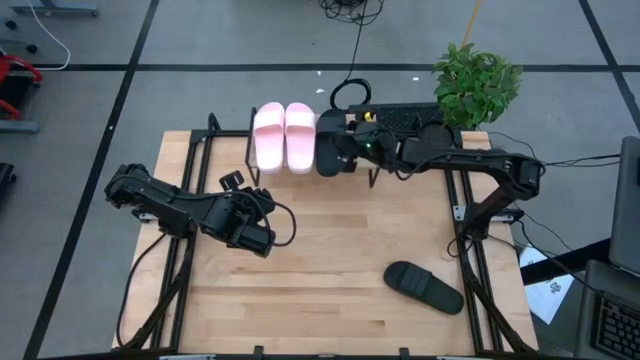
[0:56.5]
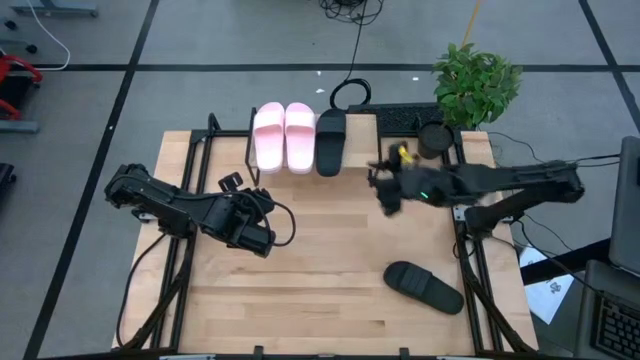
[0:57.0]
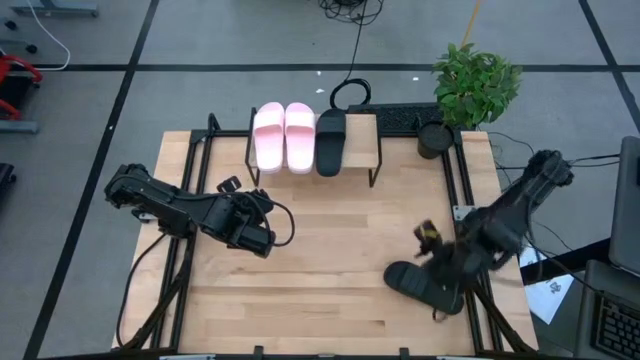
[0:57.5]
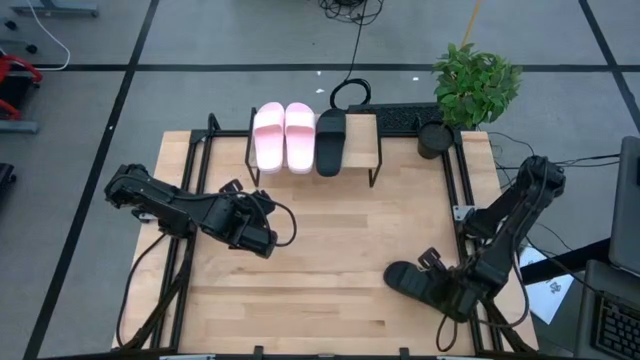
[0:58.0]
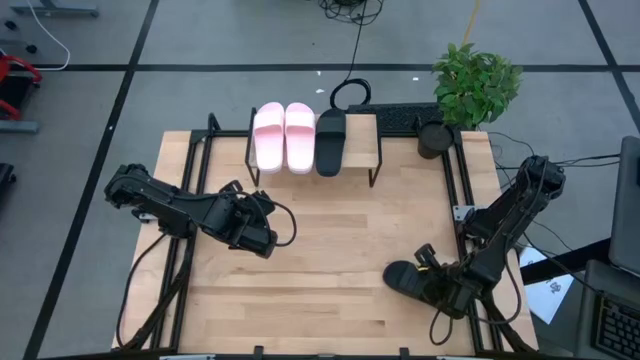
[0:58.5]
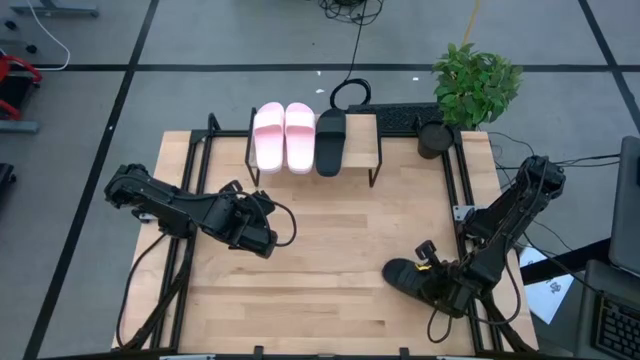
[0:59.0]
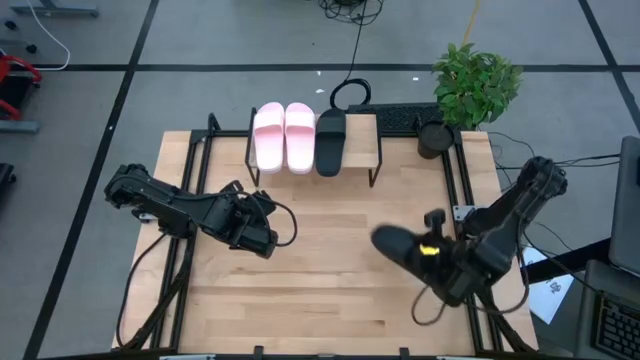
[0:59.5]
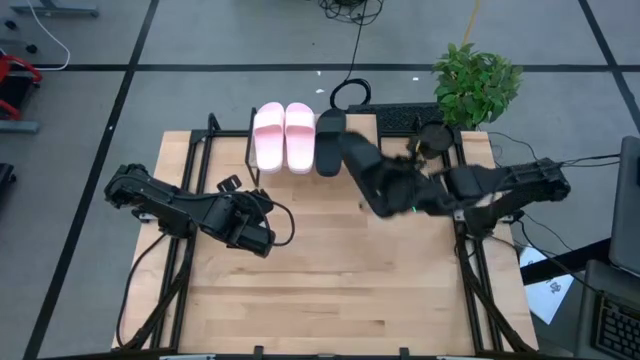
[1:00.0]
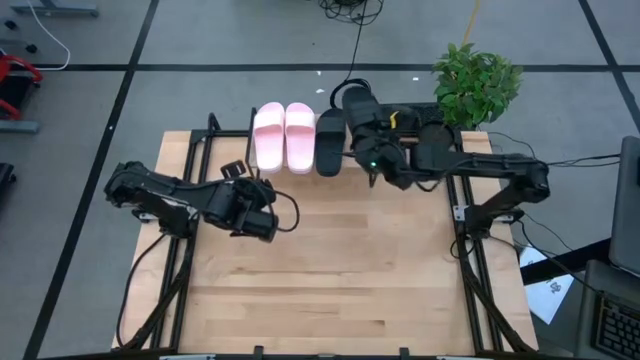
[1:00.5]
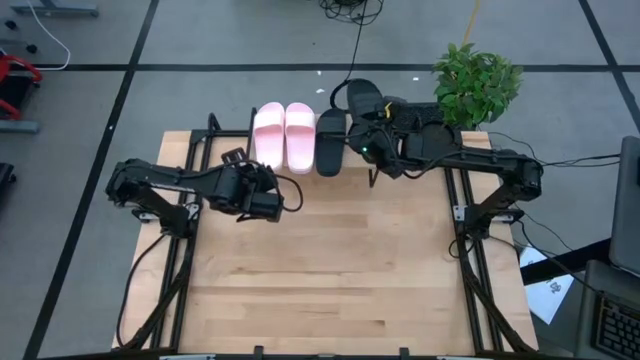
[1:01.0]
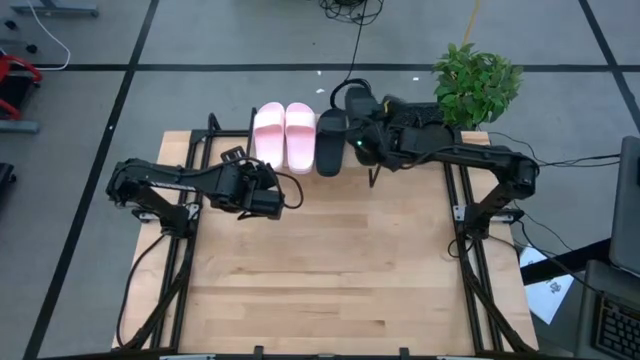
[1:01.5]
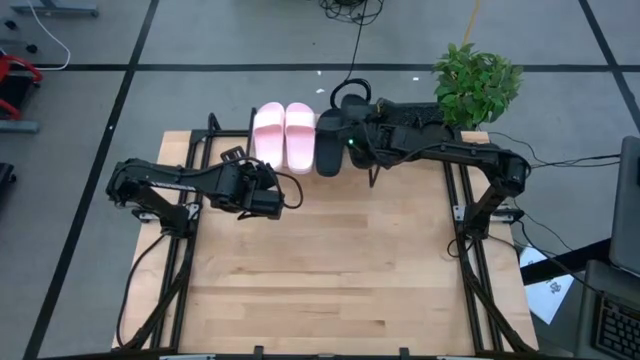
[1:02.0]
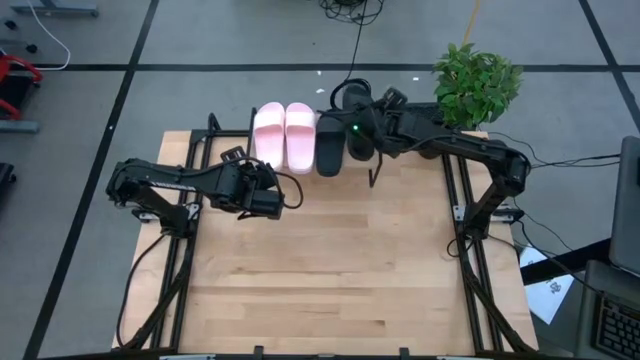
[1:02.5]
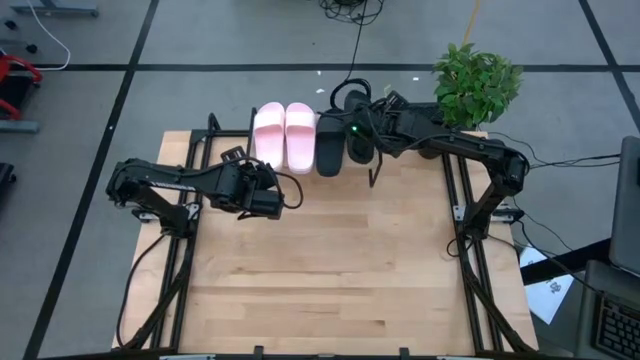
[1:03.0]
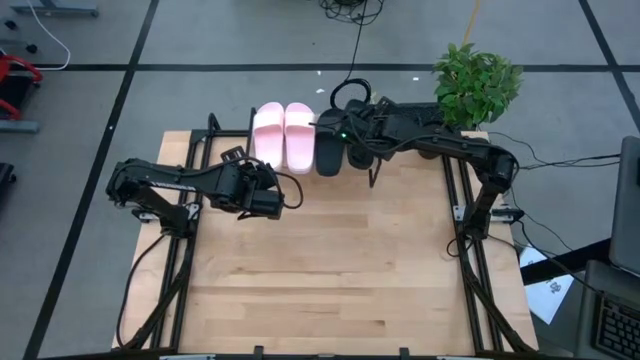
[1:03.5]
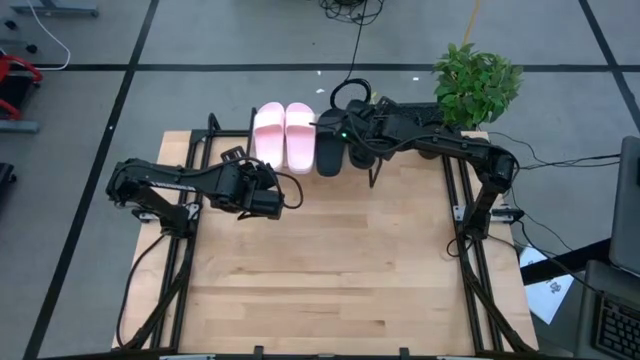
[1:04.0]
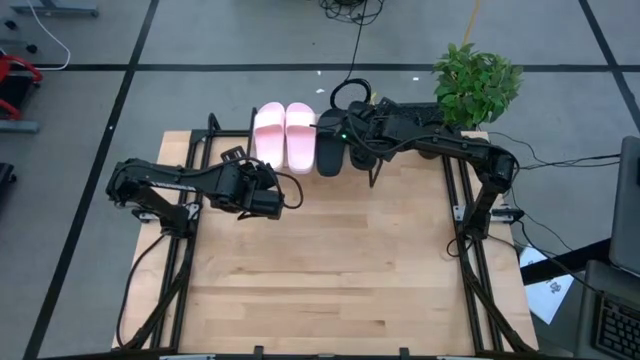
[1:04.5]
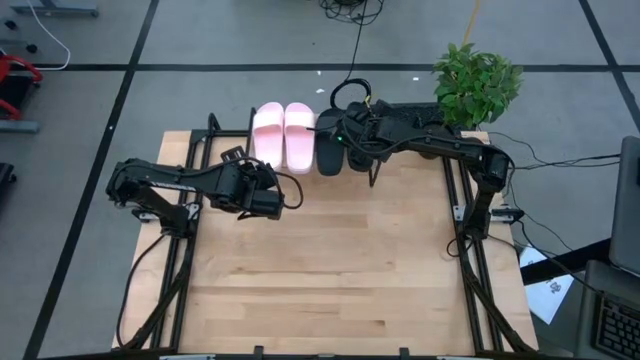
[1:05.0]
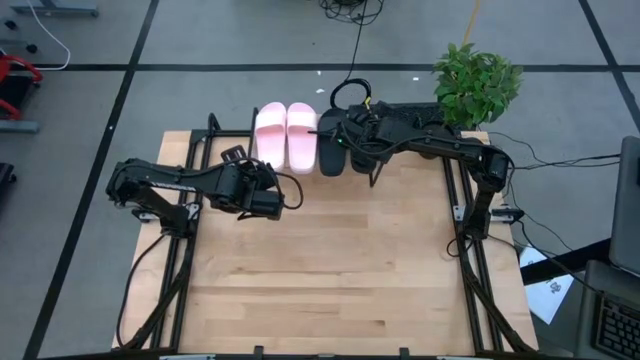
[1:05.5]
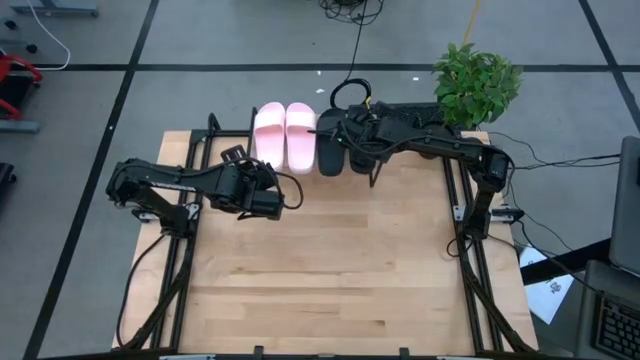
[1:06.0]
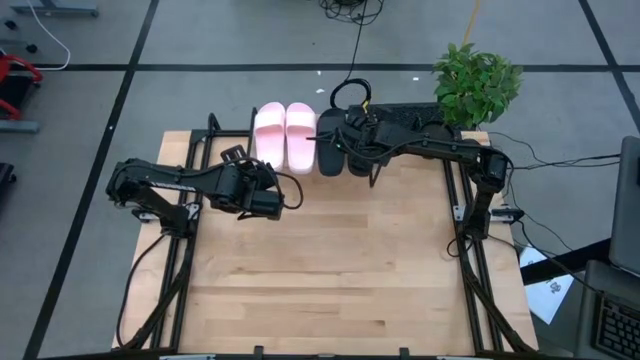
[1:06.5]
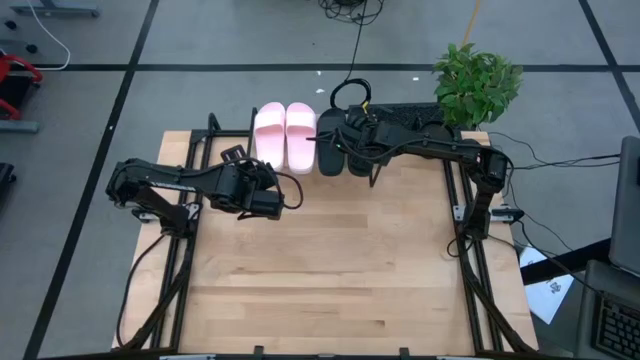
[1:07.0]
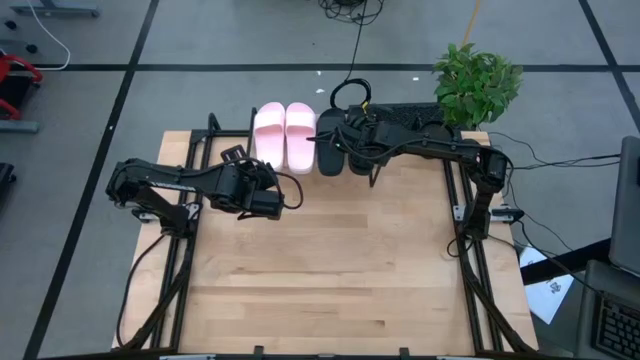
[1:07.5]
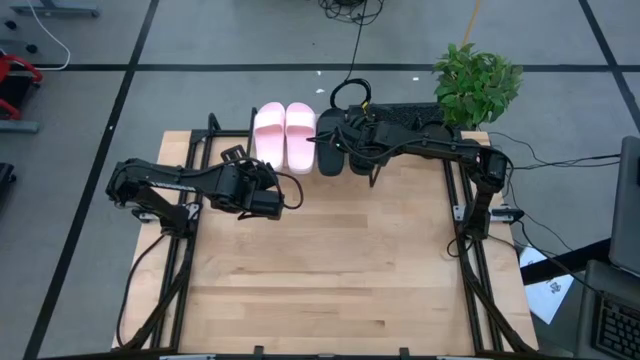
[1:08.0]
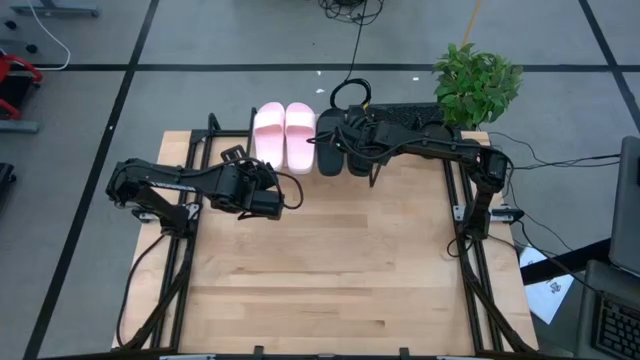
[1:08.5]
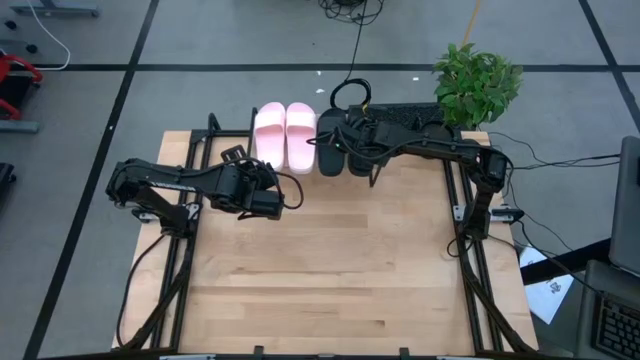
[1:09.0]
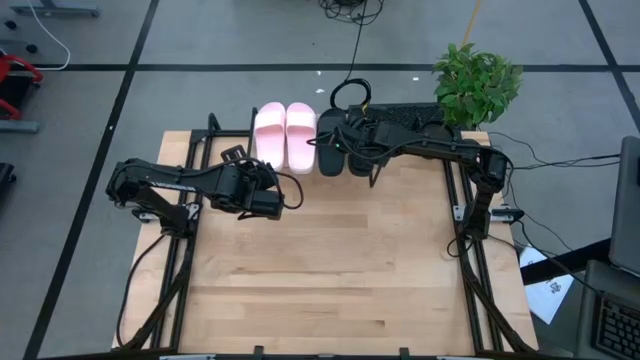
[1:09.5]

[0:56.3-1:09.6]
Task: Pick and place slides into the shelf
Put the black slides on the shelf

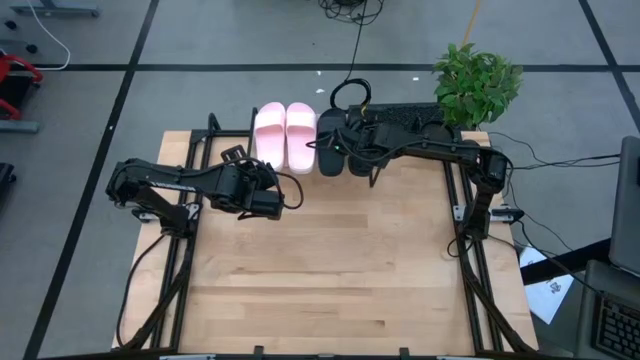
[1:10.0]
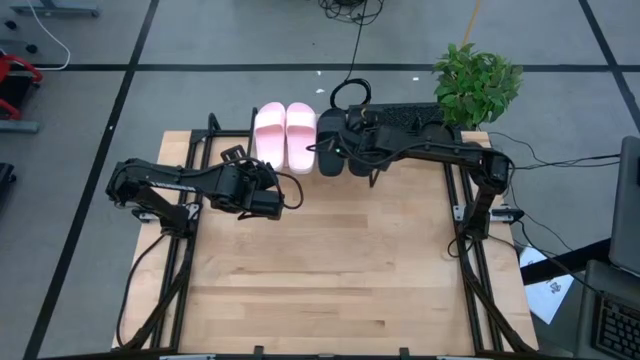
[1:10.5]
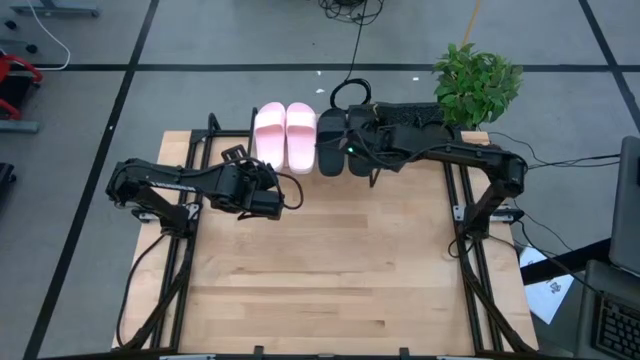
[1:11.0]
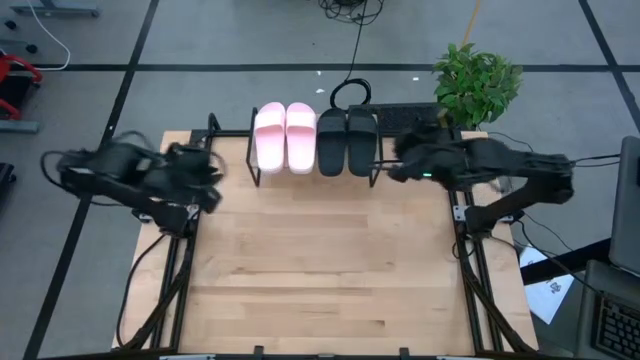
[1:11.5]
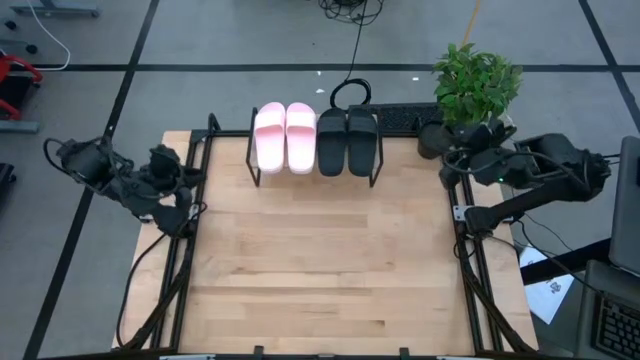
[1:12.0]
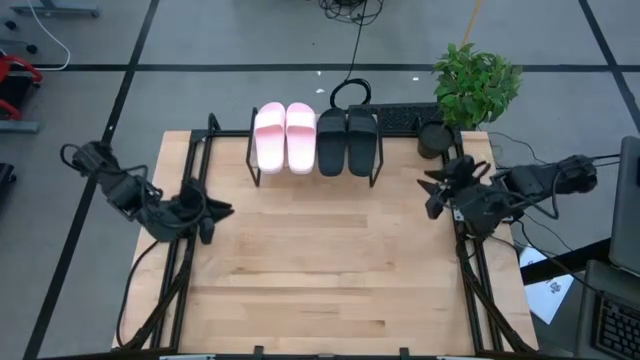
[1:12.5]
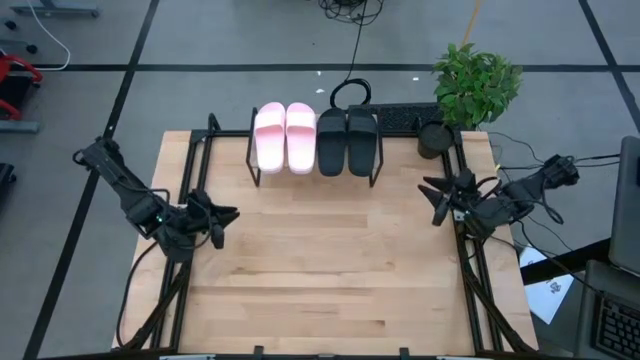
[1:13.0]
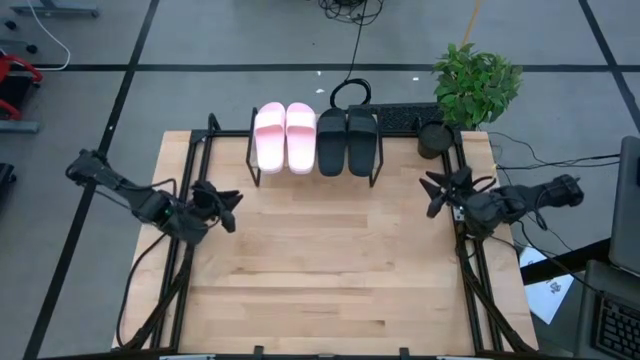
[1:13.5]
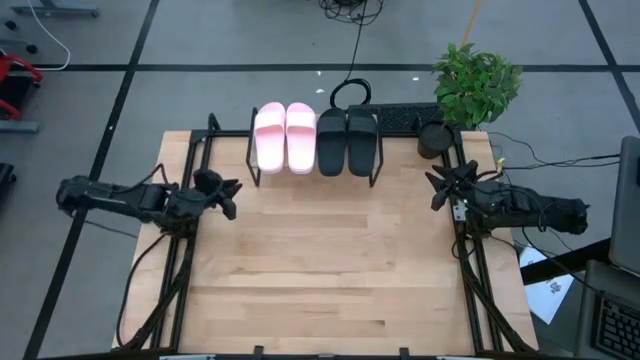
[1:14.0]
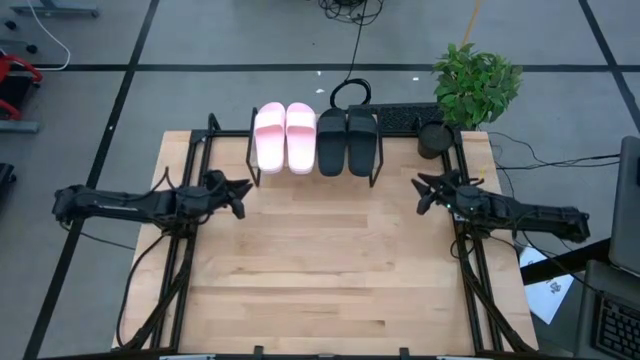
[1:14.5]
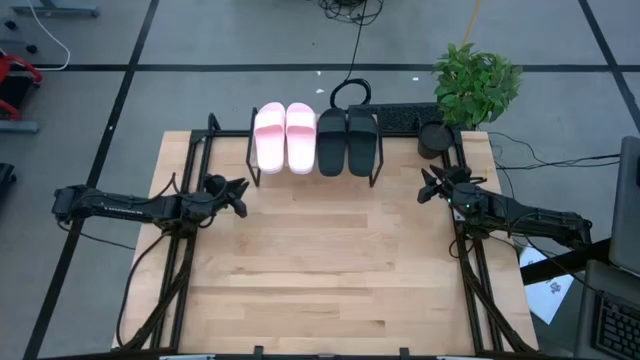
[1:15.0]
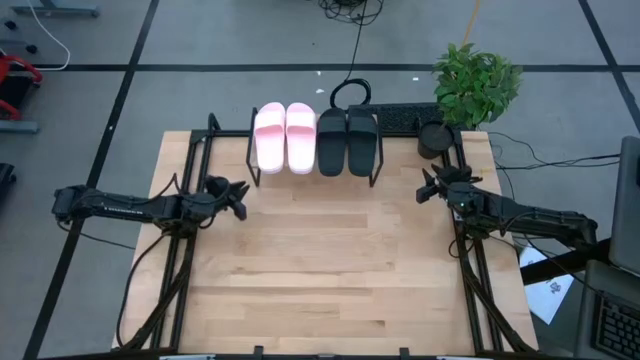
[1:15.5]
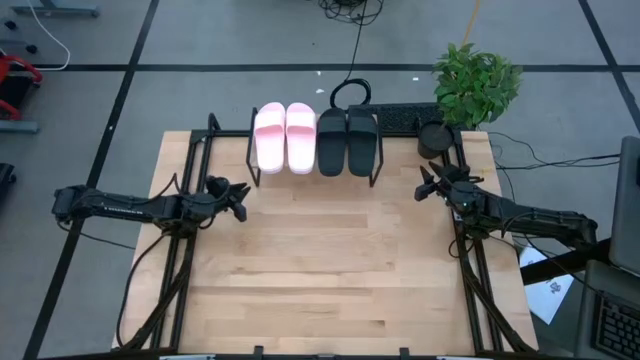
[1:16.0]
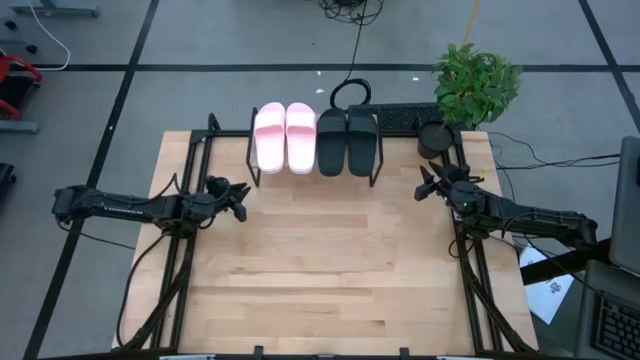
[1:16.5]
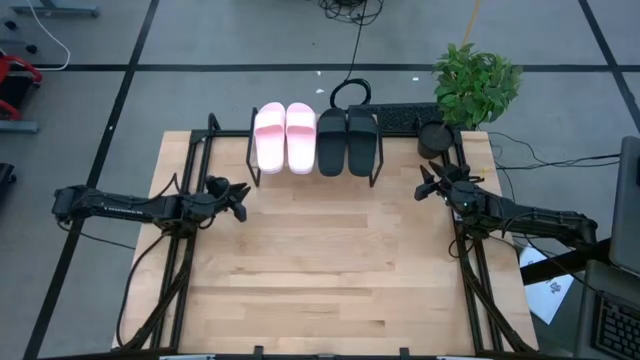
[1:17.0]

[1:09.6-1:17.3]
Return to Home Position
